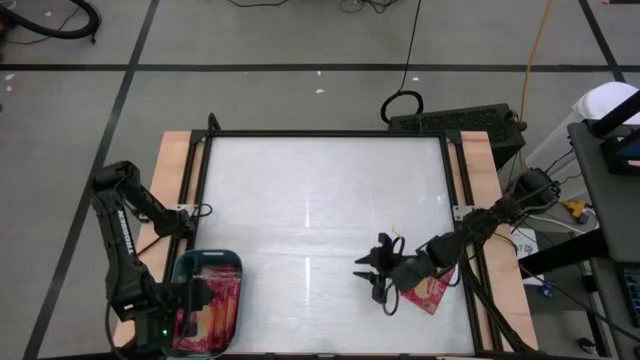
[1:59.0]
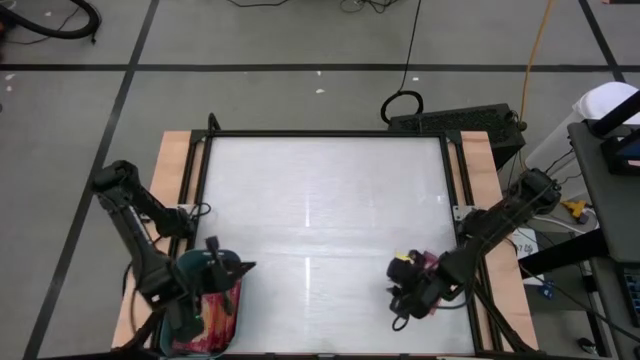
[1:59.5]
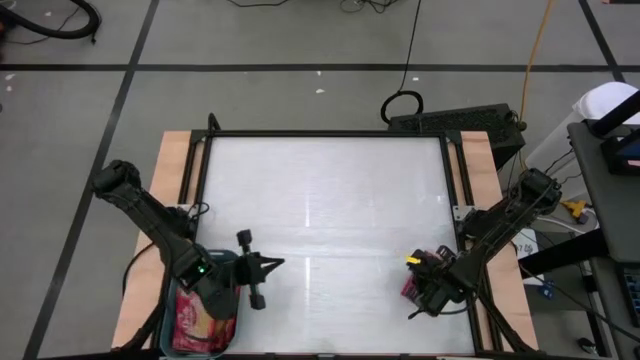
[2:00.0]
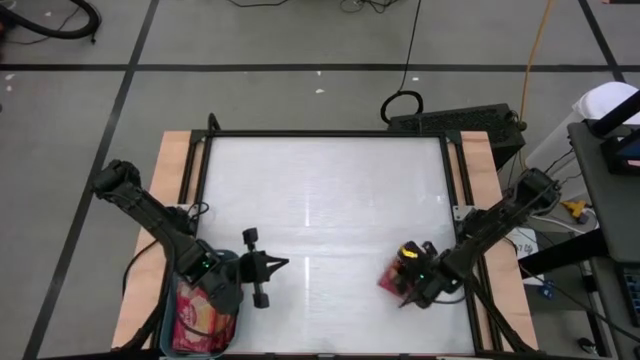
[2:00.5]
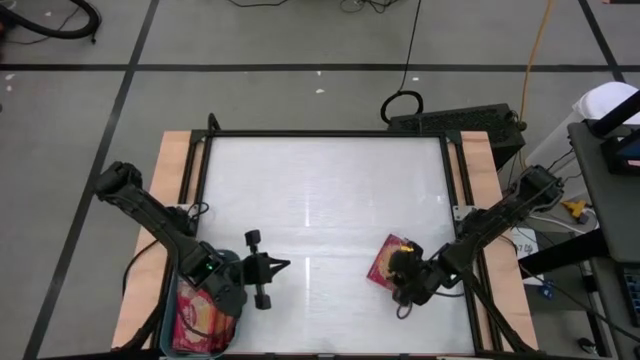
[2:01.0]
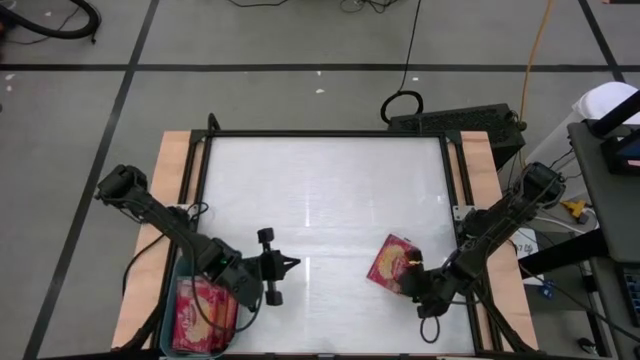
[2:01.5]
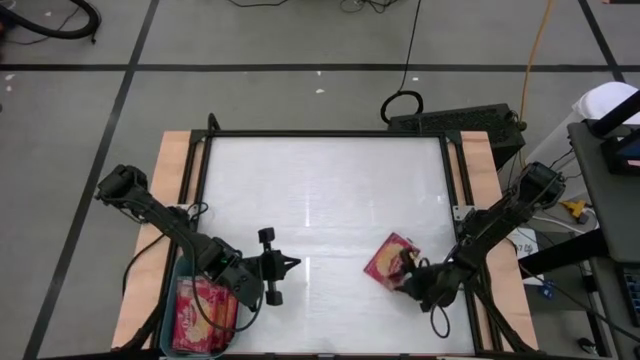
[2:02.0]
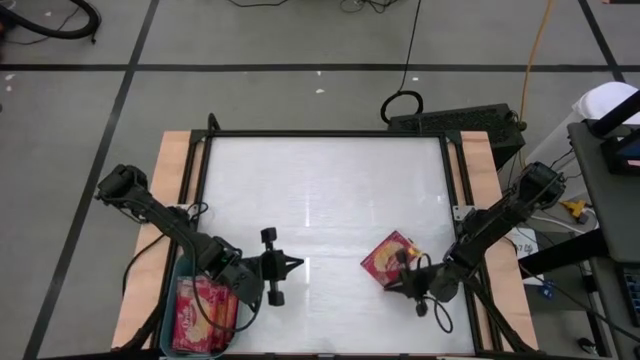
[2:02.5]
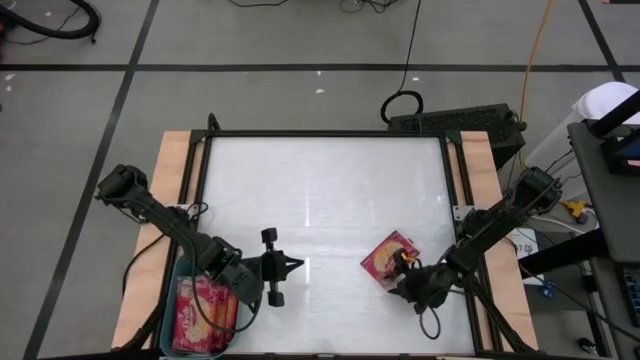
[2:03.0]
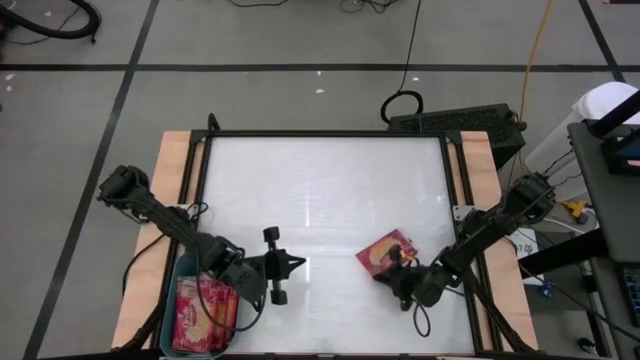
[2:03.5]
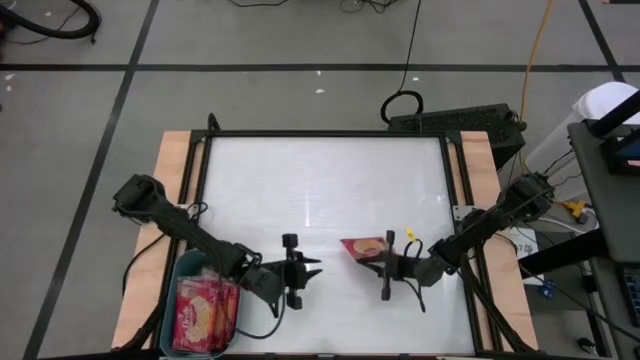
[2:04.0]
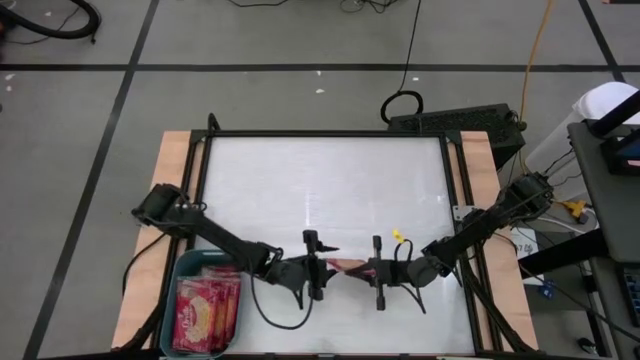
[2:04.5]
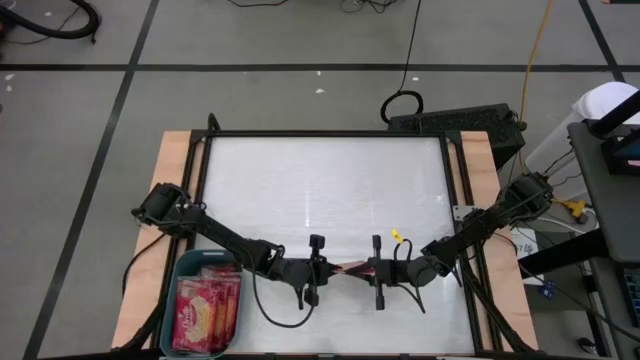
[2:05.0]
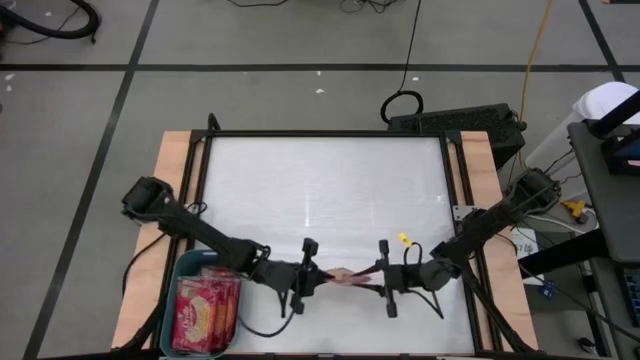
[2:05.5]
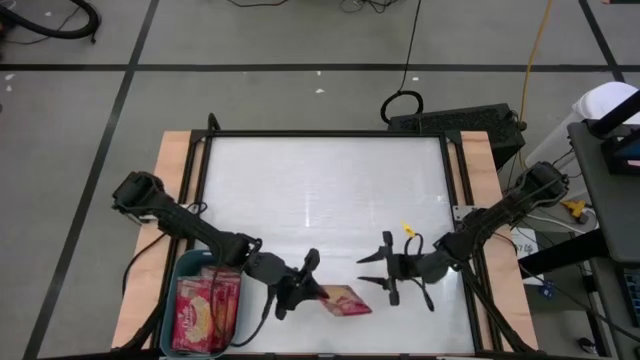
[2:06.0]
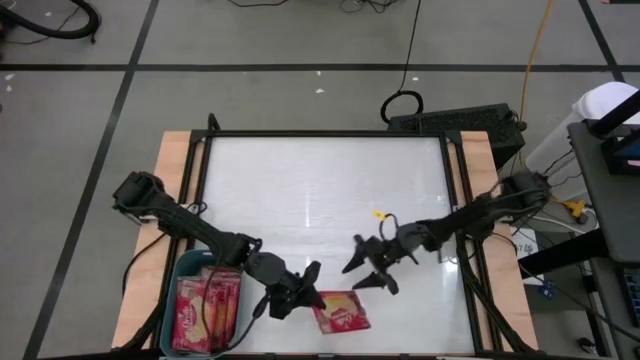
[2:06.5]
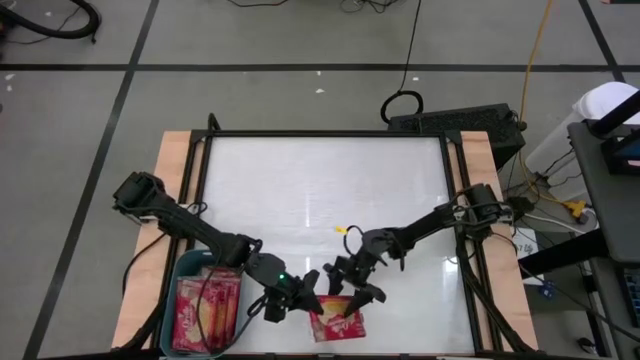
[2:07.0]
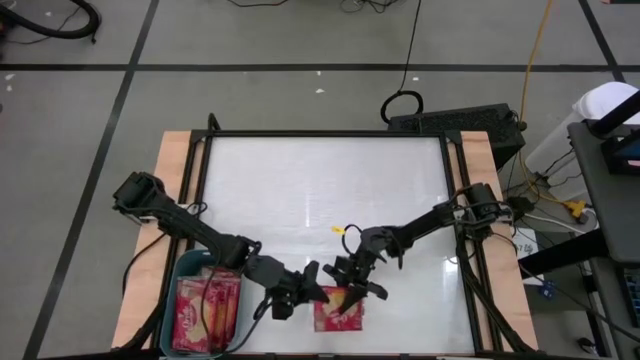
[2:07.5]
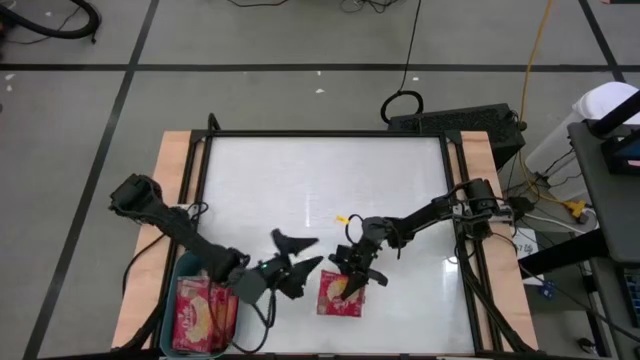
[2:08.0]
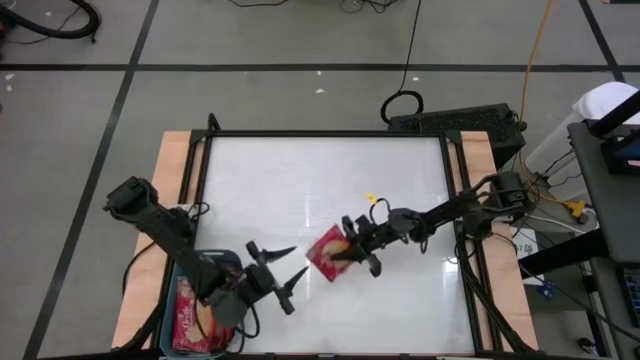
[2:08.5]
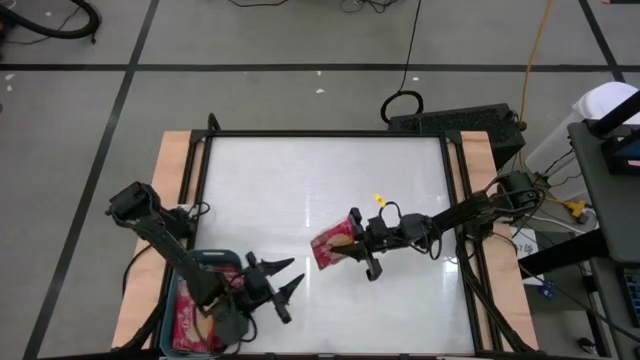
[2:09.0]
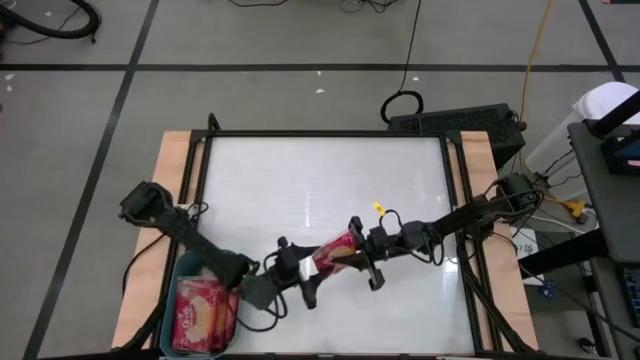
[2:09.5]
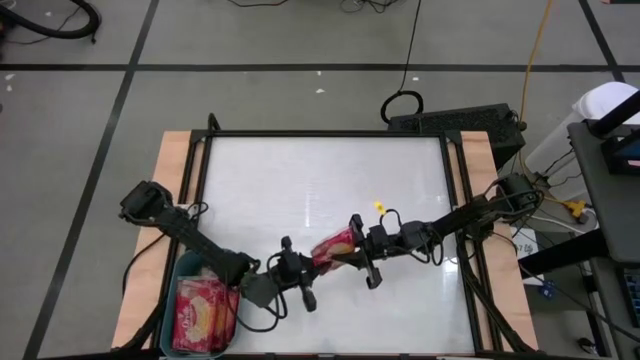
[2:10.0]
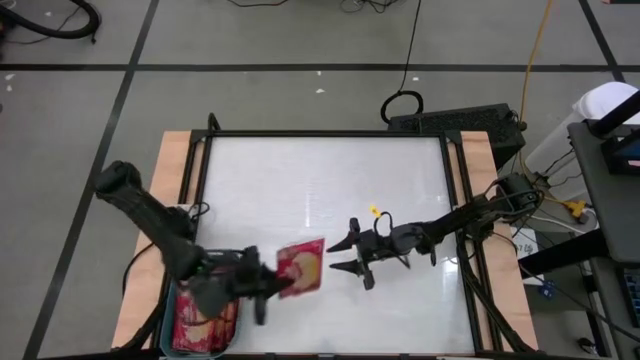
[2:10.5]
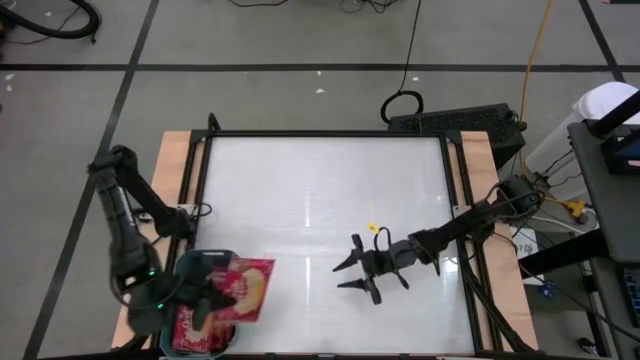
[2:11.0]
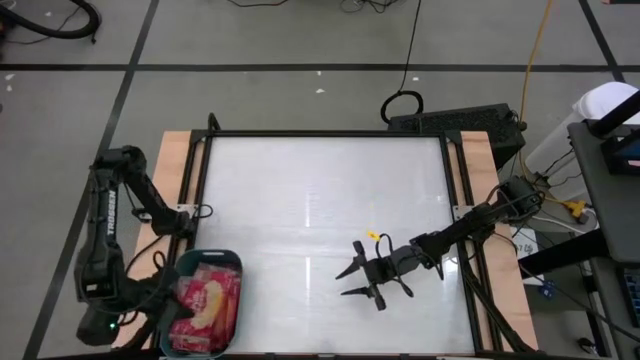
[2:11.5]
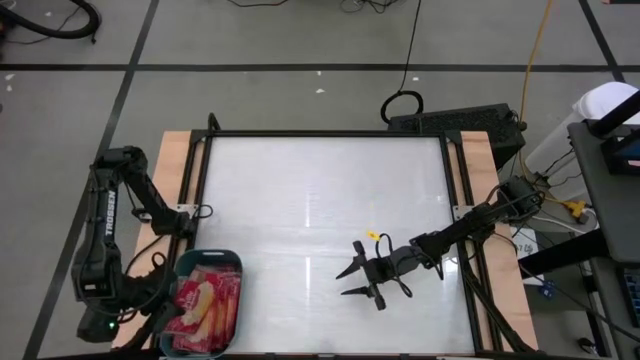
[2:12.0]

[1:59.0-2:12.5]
Task: Sort popcorn bags into baskets
Put the red popcorn bag into the blue bin

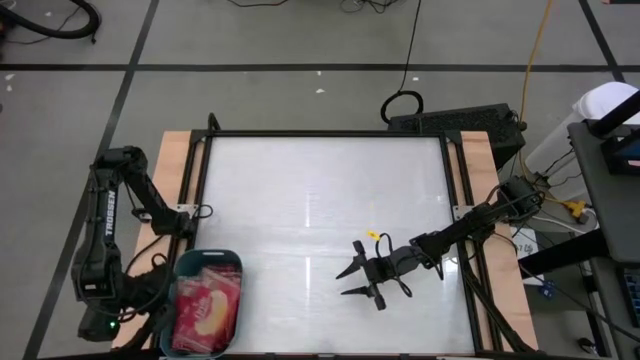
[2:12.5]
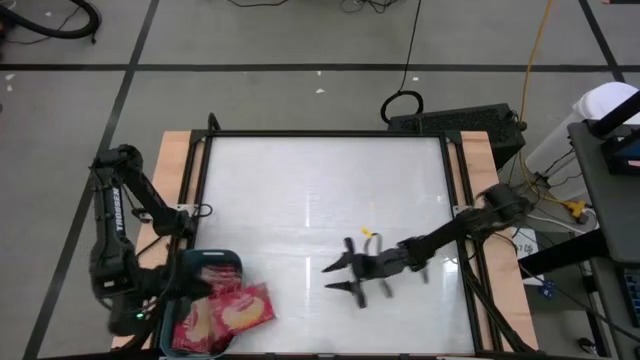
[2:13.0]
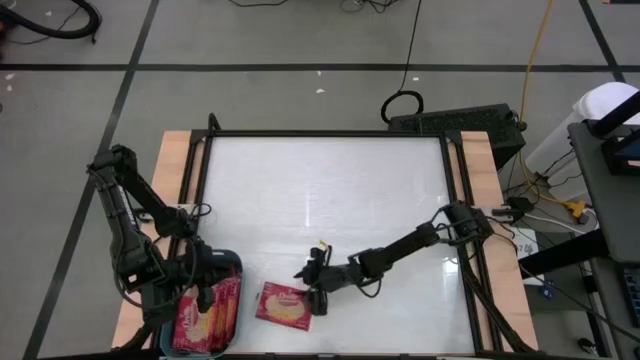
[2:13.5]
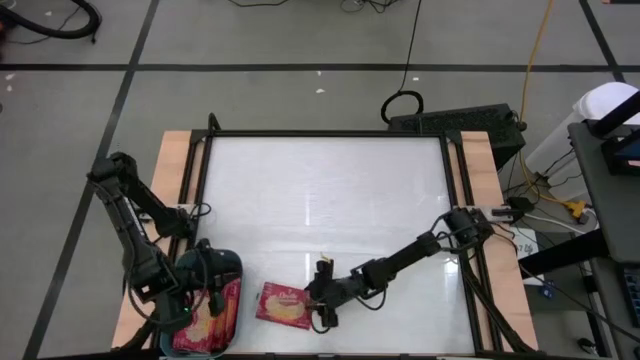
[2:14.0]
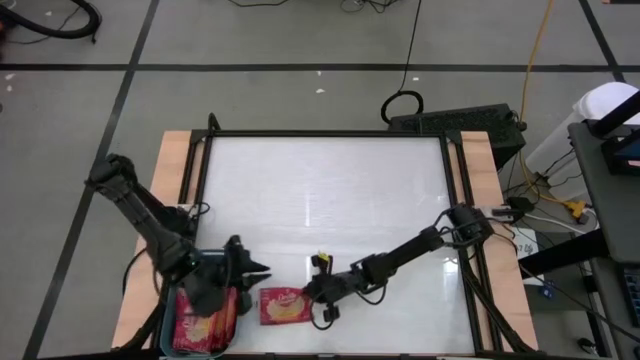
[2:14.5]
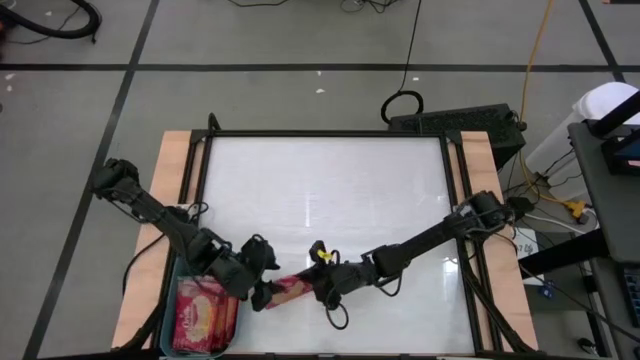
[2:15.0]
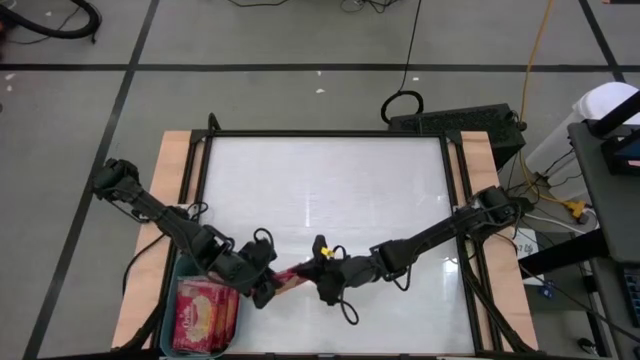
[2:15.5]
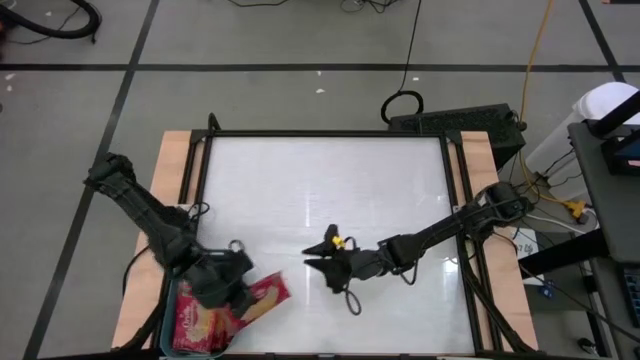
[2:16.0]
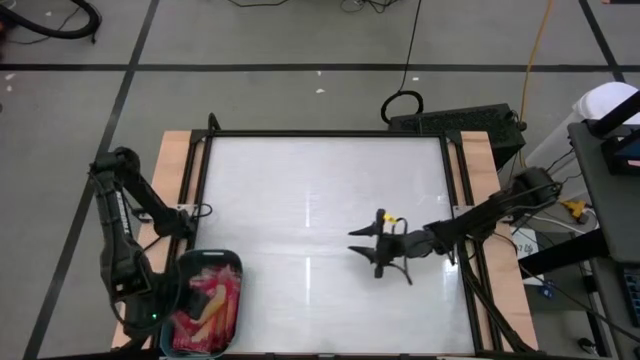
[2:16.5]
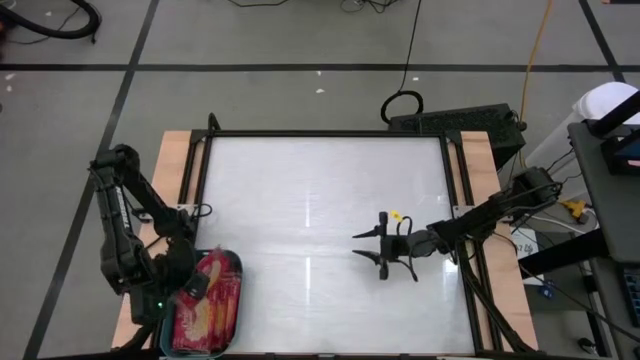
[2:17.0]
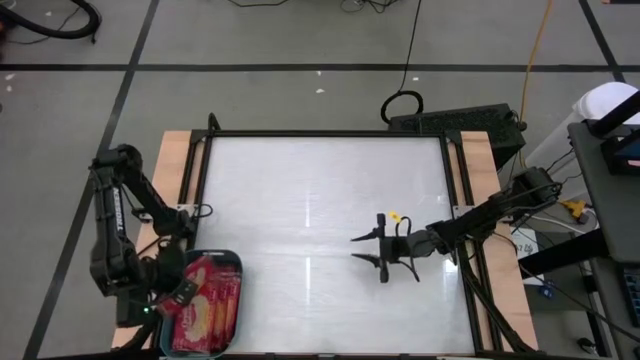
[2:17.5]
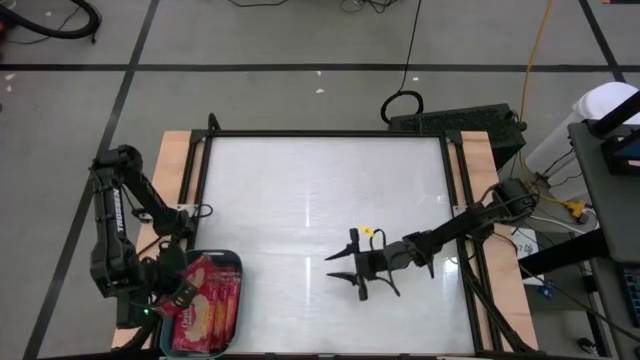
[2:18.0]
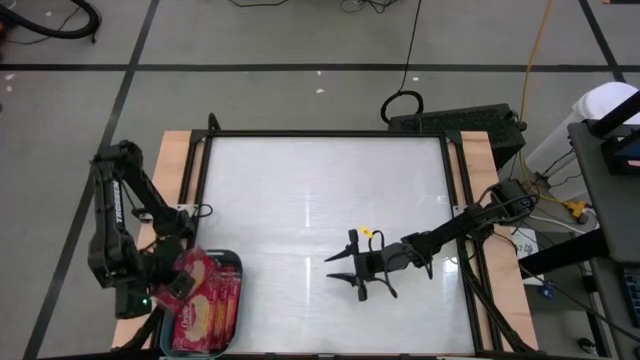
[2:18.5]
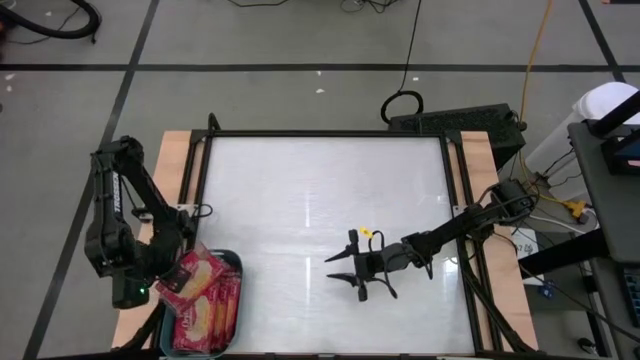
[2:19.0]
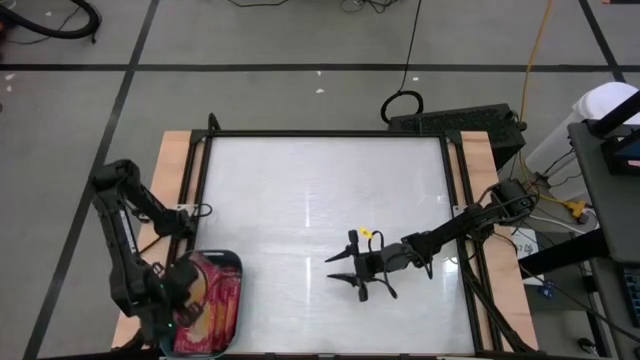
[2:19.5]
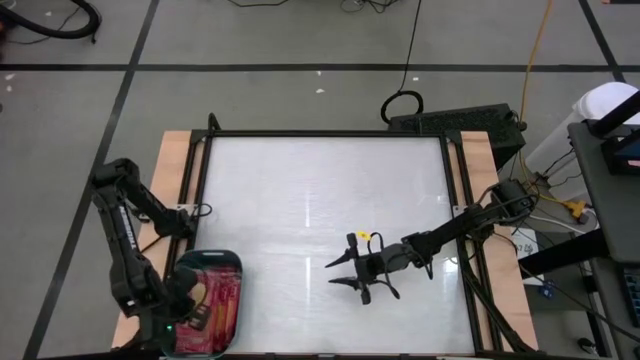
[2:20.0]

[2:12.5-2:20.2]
Put the red popcorn bag into the blue bin
